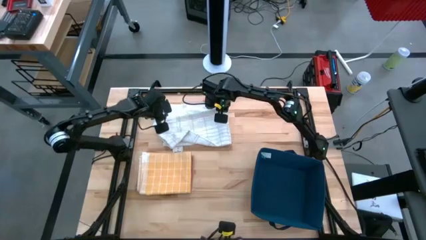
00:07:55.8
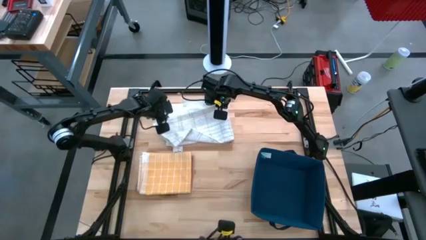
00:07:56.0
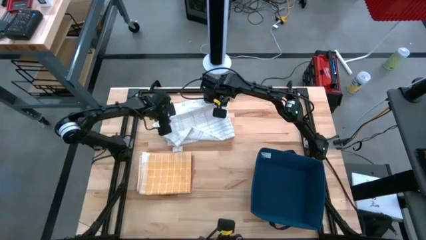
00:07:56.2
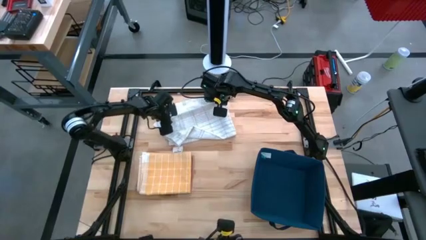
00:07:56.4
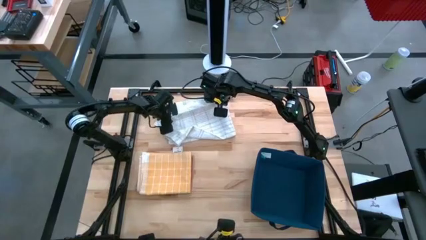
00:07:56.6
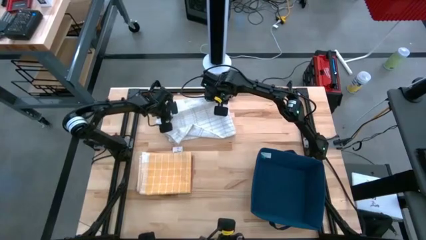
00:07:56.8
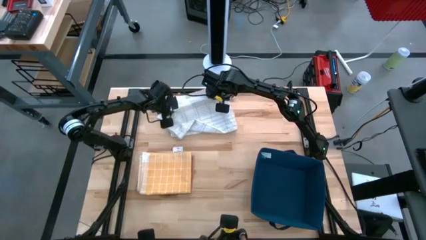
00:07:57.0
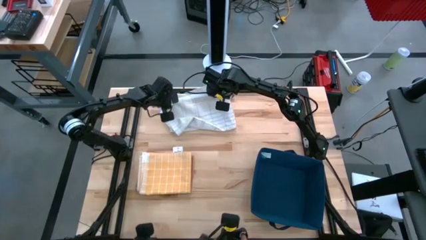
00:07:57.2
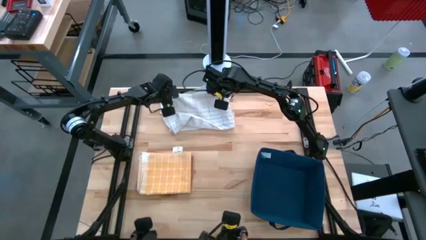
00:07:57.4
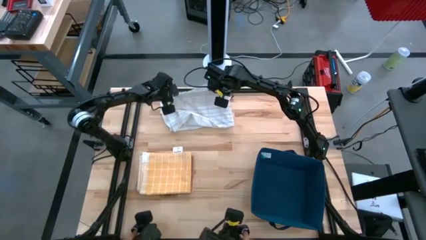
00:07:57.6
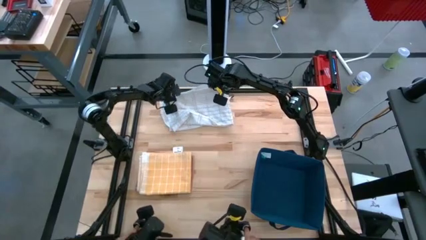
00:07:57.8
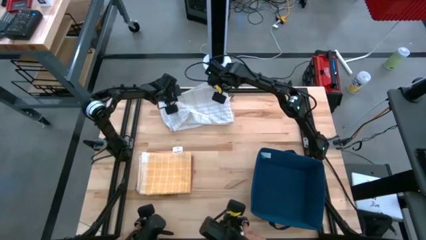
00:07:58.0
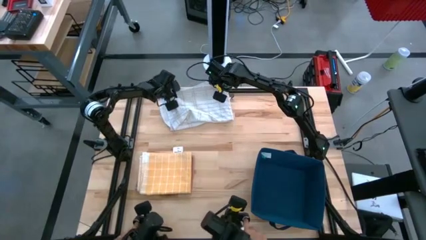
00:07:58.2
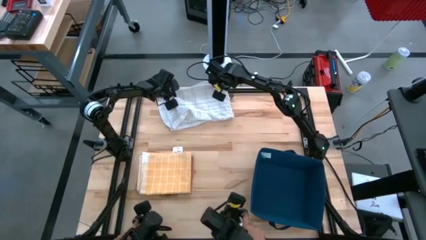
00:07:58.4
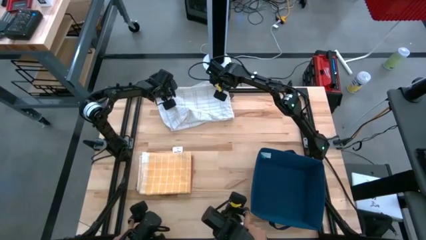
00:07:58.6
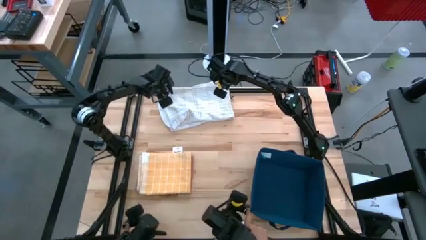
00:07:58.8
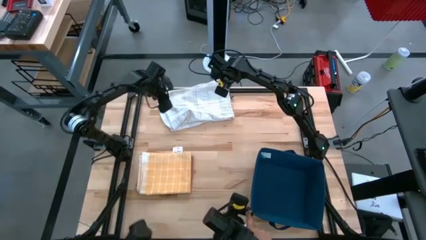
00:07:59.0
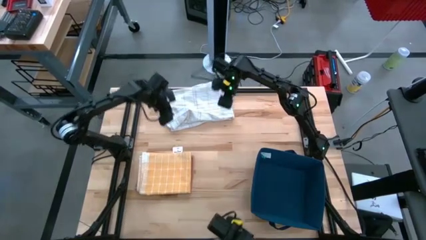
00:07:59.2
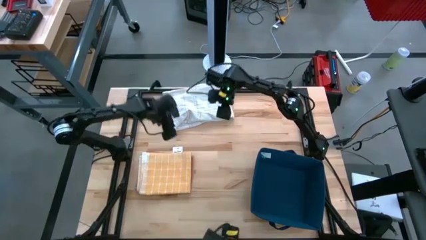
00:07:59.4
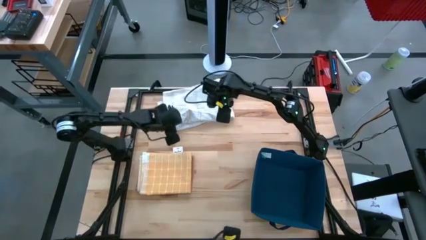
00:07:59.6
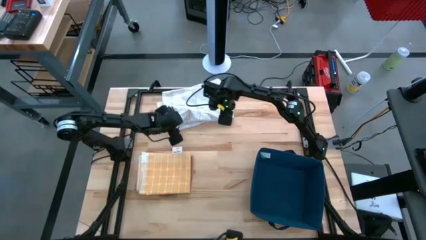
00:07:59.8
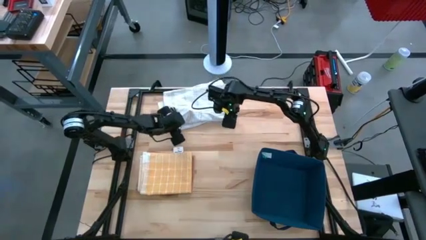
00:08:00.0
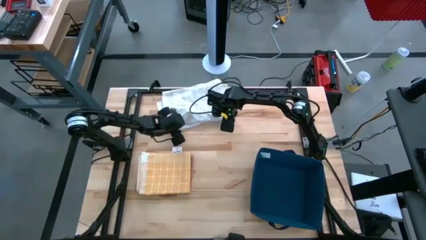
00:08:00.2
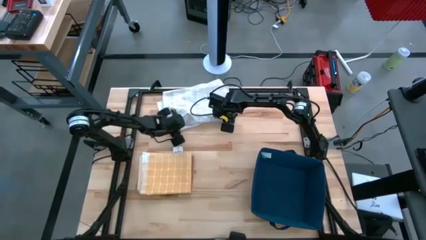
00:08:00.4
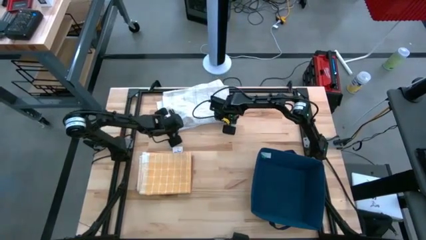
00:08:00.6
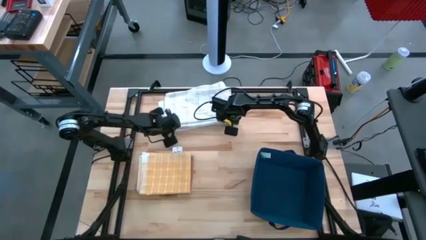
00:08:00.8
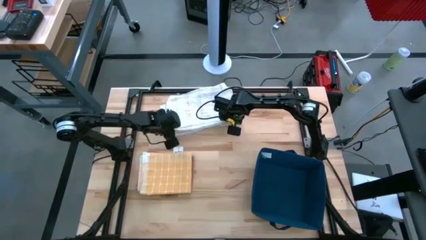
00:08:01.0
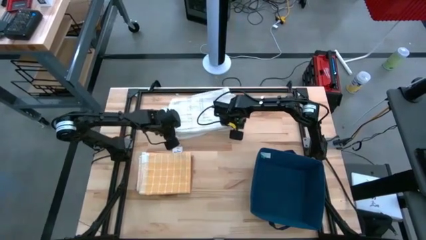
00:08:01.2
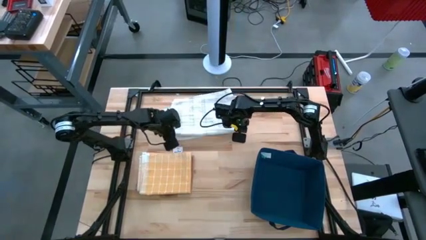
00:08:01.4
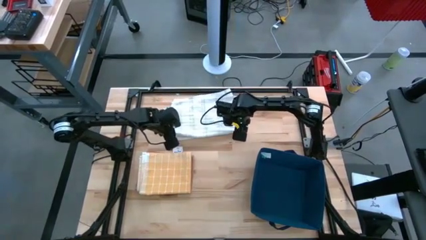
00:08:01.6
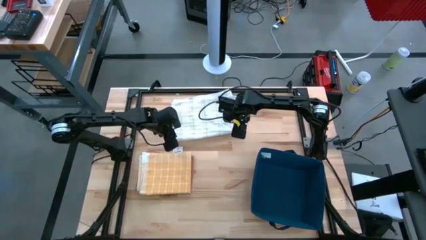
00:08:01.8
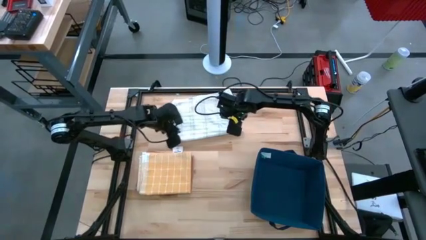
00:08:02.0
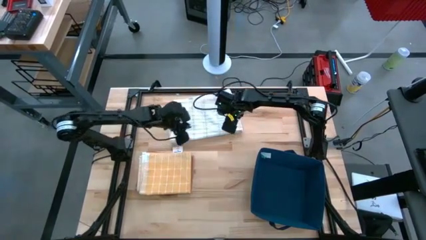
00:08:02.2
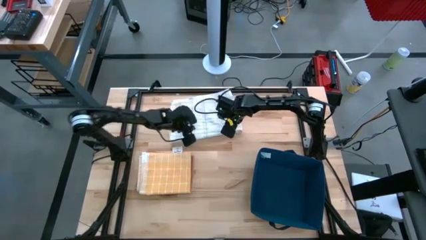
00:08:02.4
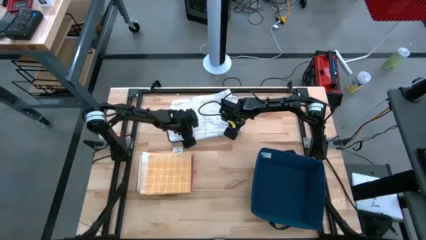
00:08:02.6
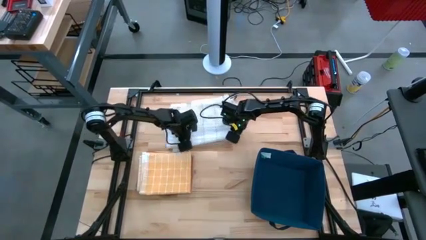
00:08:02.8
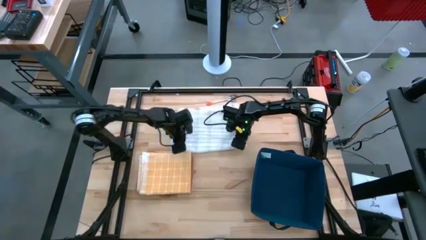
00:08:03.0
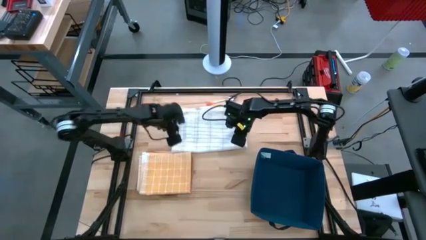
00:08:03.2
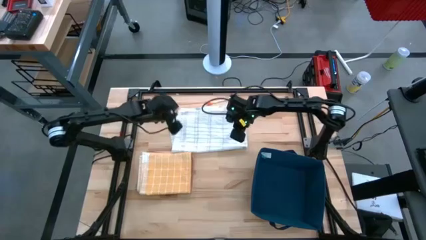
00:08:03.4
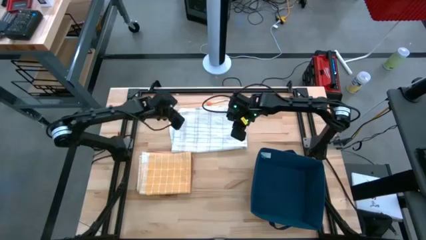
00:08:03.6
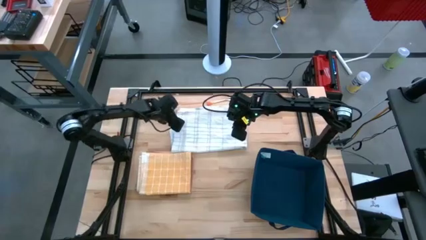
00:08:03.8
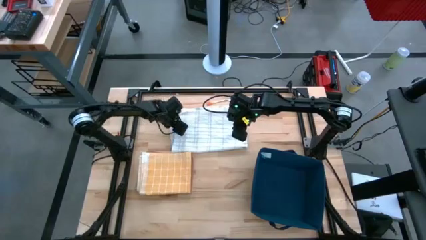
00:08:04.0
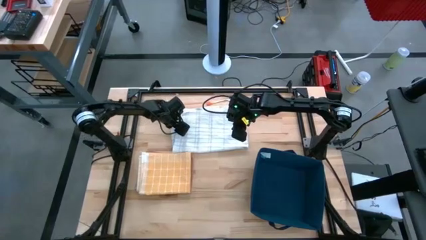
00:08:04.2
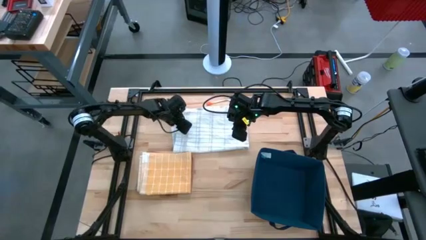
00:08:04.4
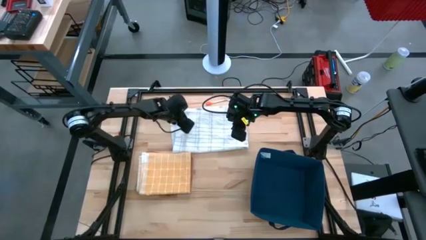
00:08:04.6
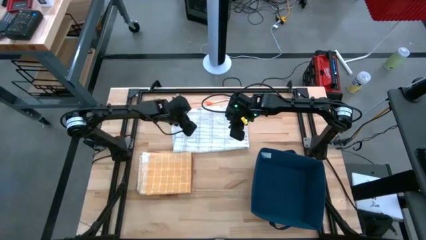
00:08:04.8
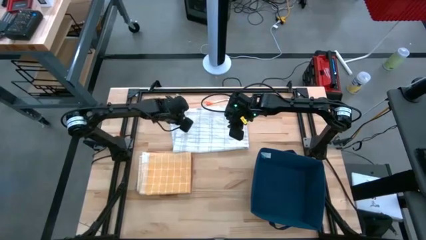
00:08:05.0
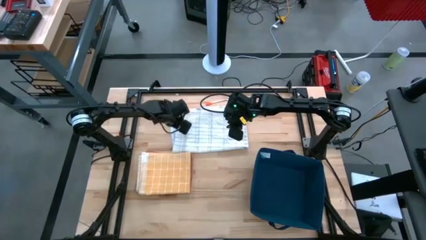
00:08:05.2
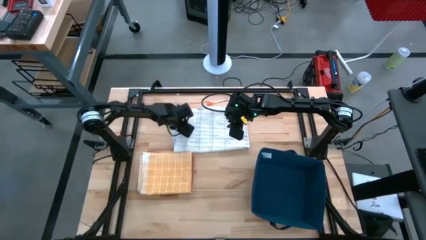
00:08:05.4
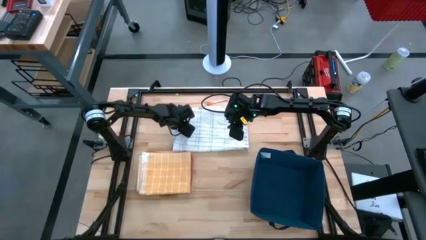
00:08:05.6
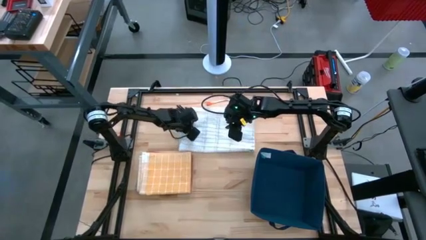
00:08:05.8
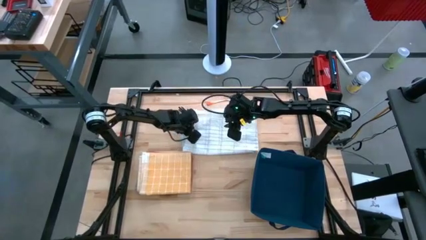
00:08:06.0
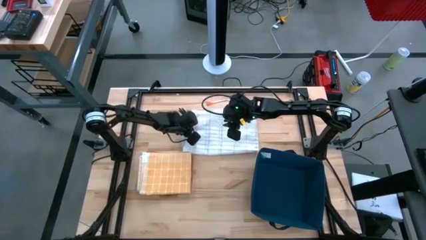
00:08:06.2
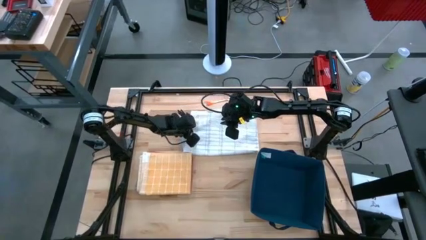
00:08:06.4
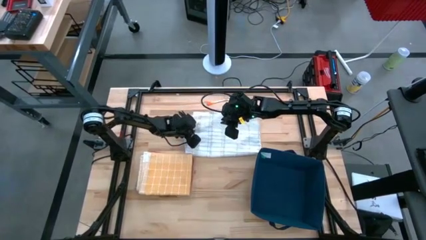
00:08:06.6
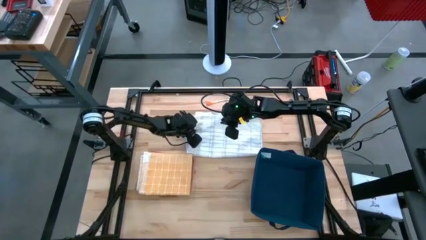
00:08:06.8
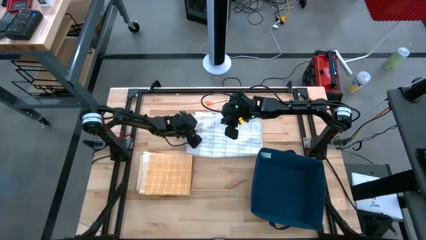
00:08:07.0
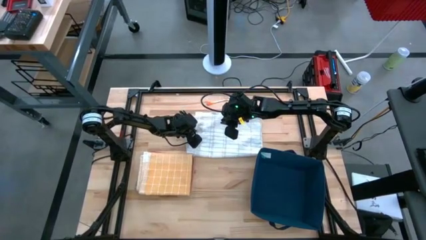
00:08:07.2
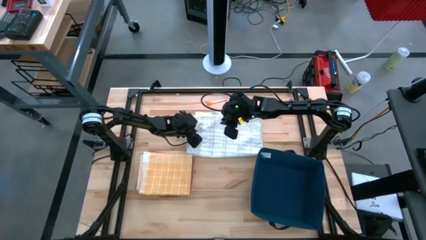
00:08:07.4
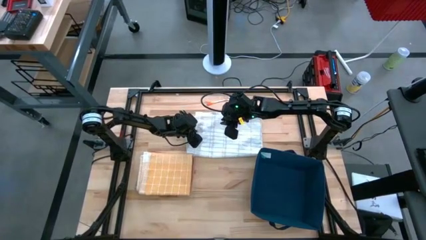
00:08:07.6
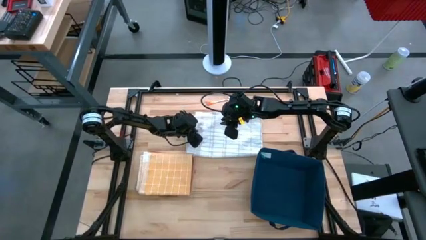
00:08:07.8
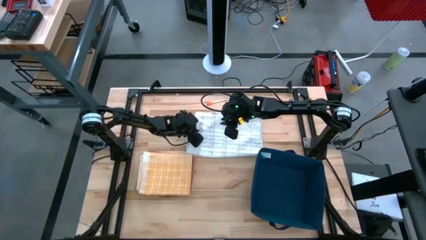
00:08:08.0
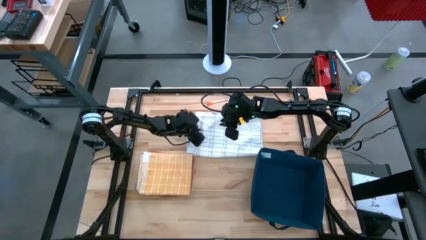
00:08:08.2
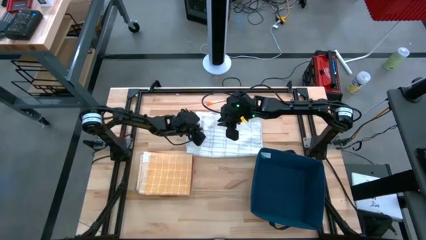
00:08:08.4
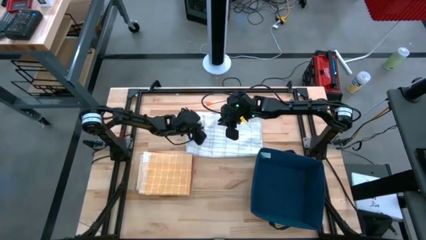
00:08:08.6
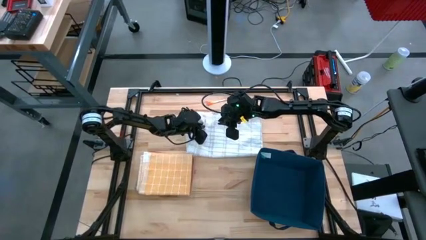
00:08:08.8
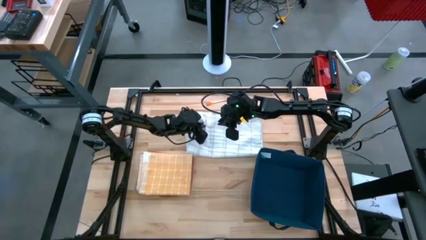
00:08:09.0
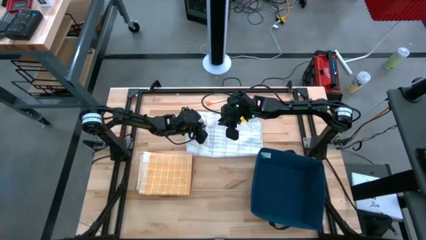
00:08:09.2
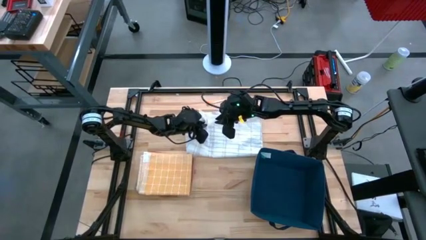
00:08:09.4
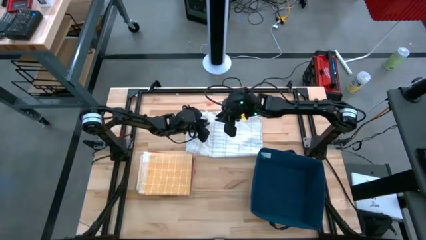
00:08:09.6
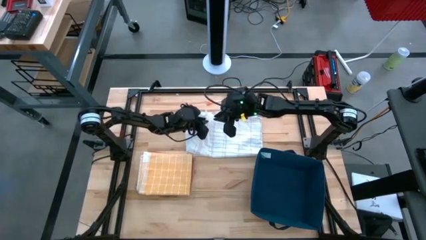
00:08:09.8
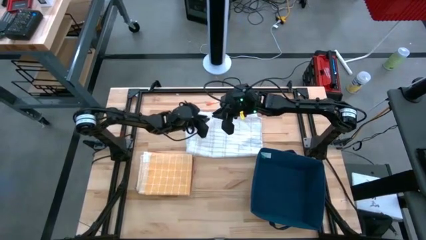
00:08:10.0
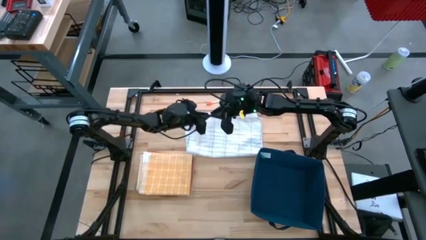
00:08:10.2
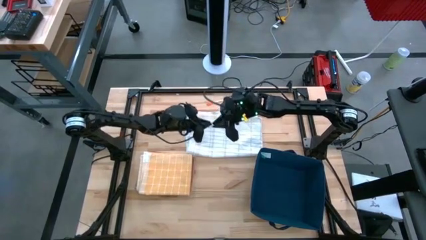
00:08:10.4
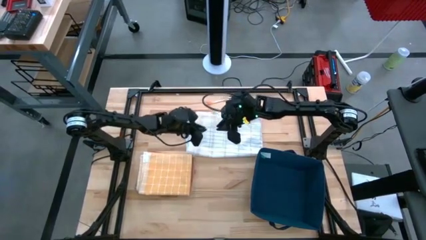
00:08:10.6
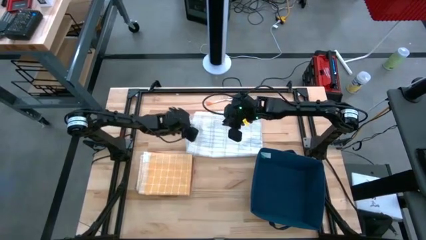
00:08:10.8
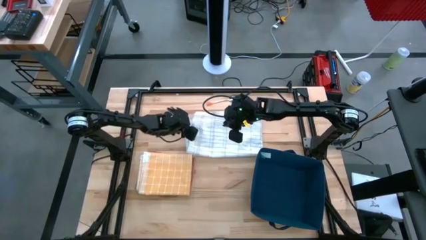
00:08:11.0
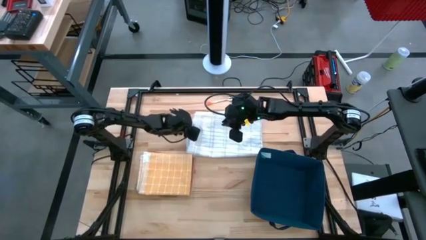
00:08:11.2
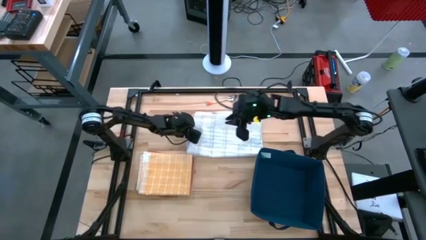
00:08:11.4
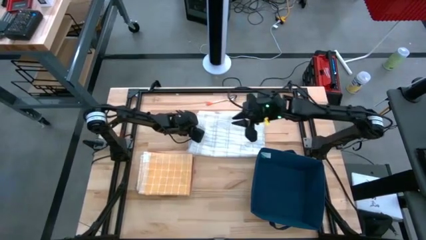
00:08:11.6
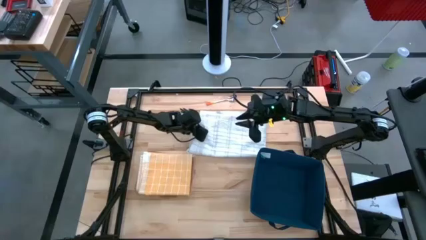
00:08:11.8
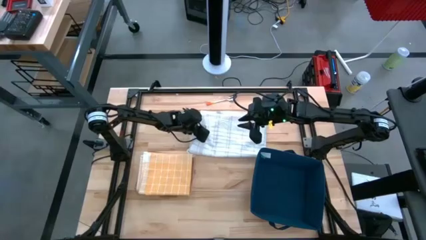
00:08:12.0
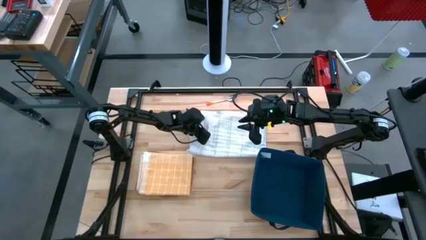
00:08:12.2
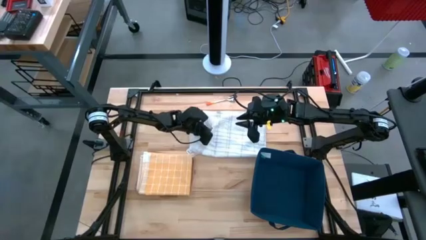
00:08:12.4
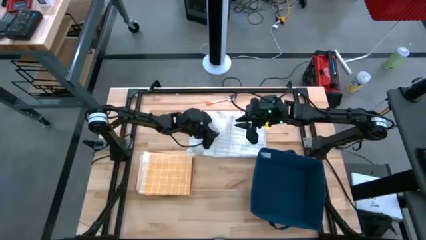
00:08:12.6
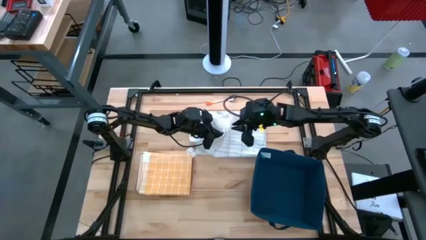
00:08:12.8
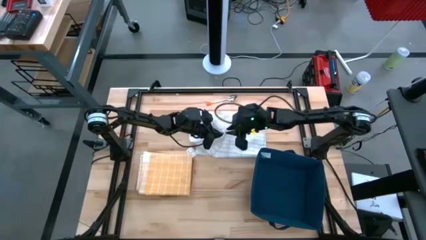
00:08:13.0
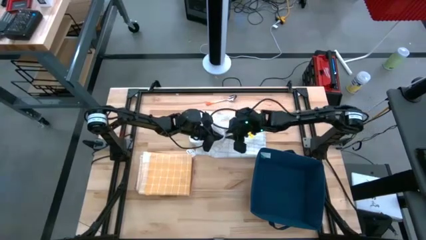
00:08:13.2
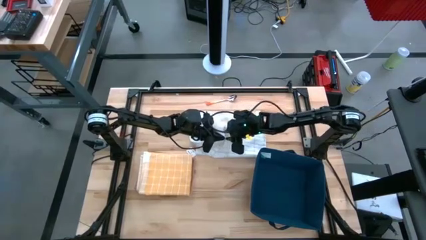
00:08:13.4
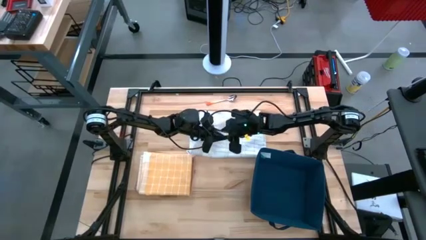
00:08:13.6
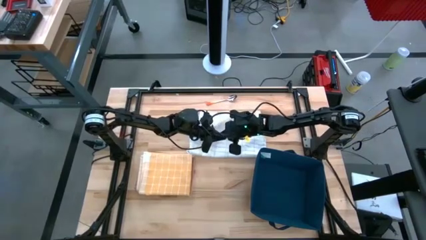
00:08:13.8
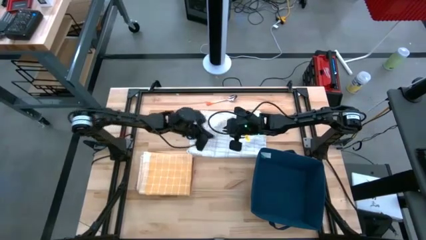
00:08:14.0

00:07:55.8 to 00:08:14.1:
Task: Fold towel
Fold the white towel
